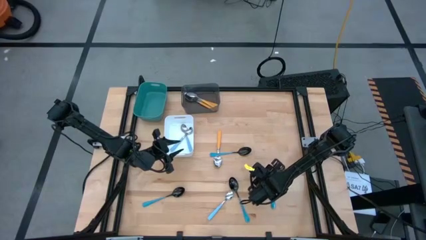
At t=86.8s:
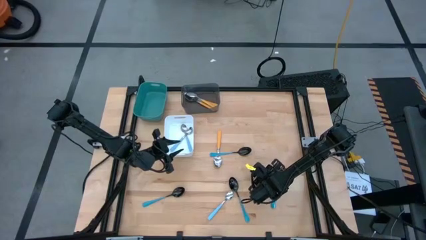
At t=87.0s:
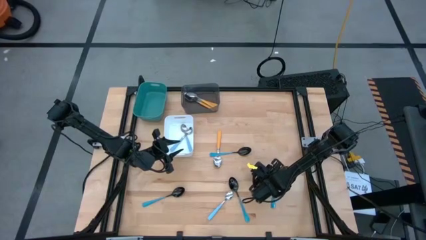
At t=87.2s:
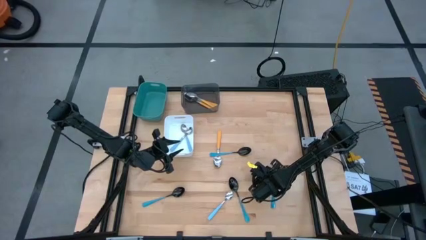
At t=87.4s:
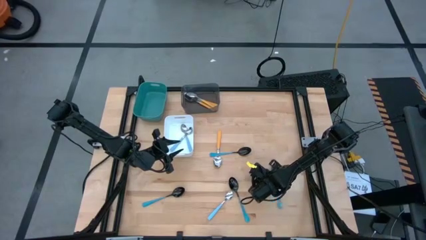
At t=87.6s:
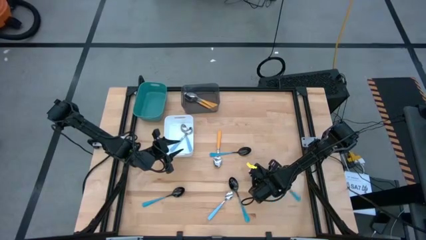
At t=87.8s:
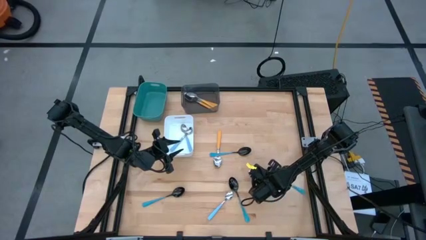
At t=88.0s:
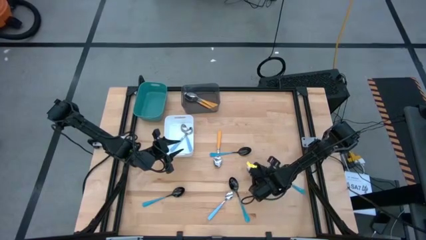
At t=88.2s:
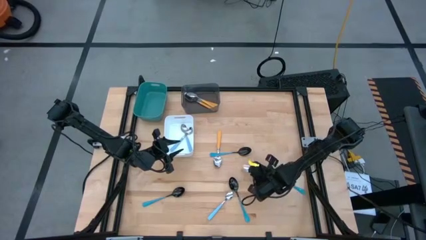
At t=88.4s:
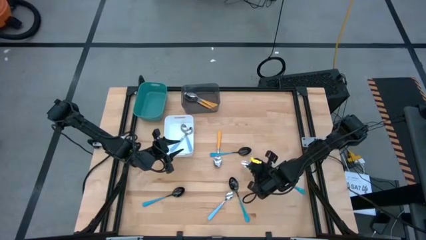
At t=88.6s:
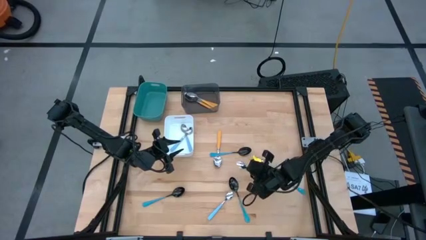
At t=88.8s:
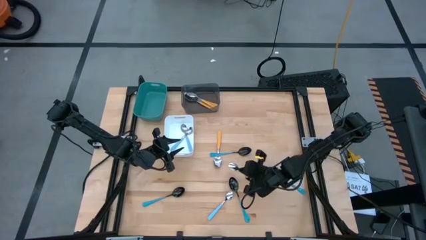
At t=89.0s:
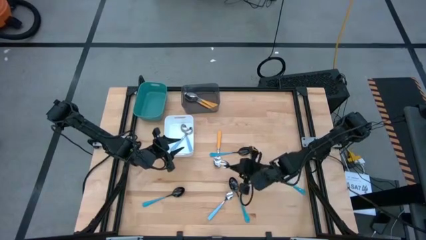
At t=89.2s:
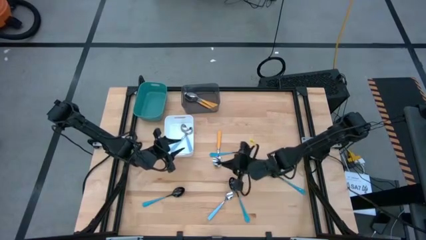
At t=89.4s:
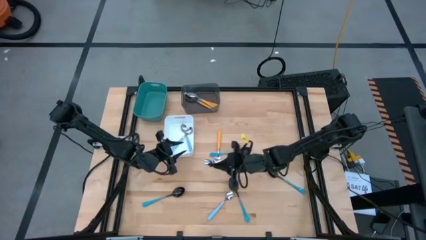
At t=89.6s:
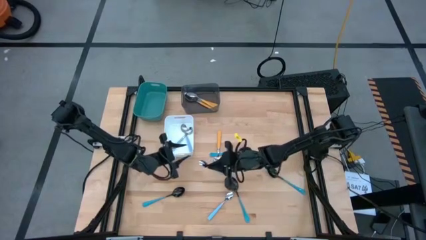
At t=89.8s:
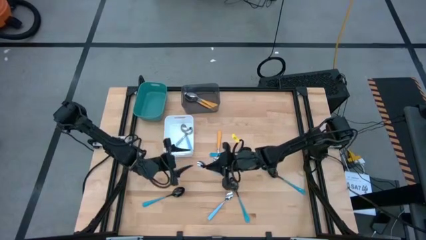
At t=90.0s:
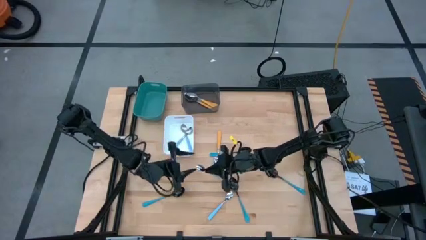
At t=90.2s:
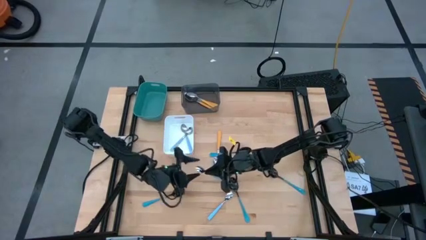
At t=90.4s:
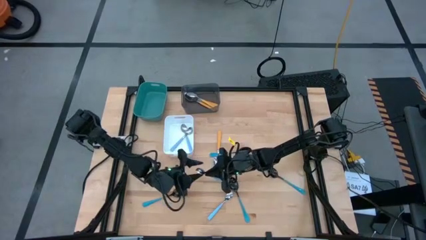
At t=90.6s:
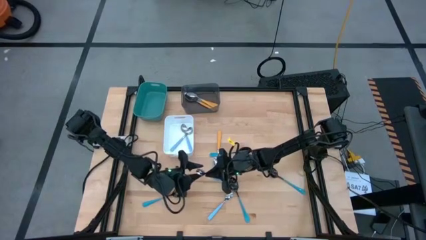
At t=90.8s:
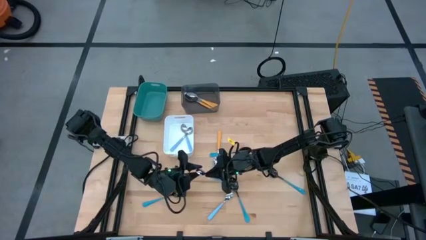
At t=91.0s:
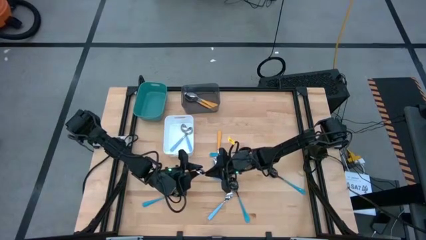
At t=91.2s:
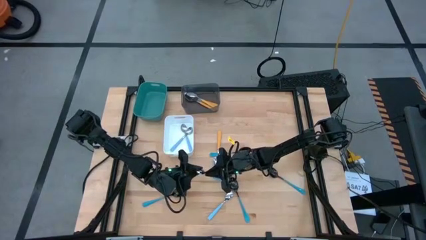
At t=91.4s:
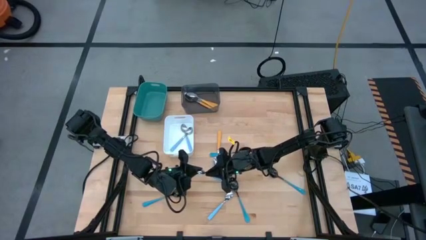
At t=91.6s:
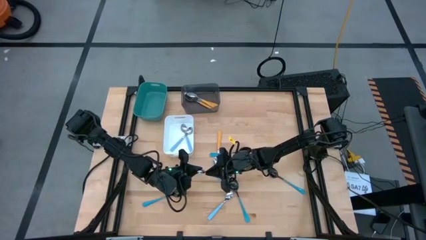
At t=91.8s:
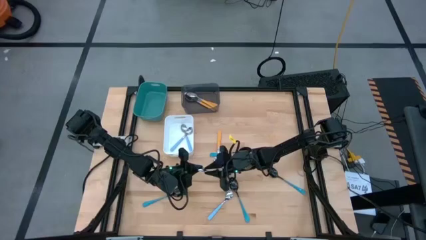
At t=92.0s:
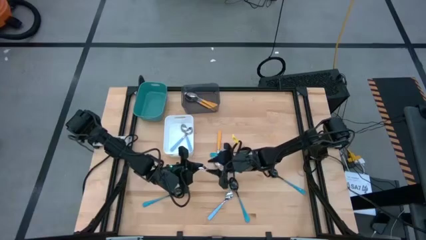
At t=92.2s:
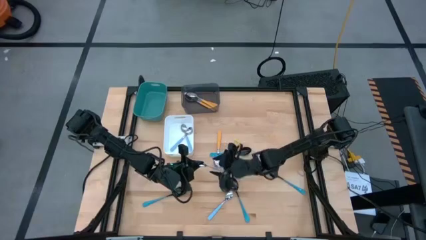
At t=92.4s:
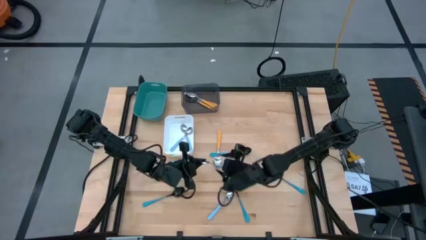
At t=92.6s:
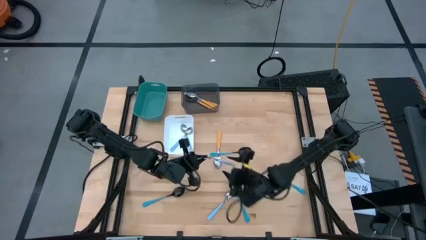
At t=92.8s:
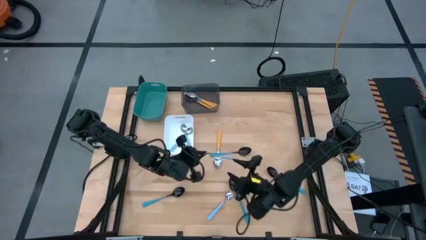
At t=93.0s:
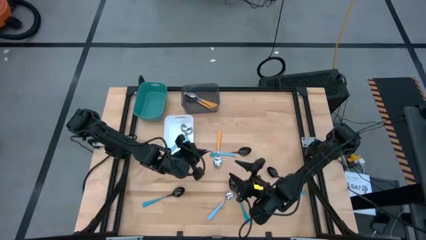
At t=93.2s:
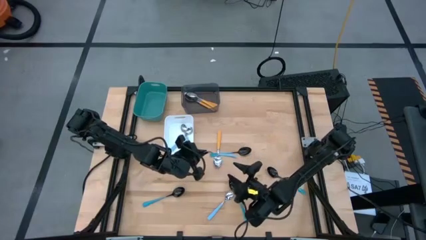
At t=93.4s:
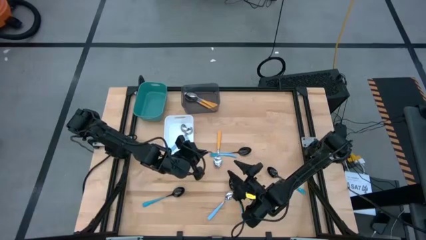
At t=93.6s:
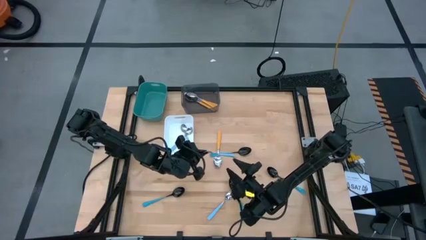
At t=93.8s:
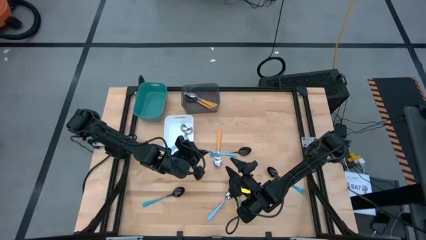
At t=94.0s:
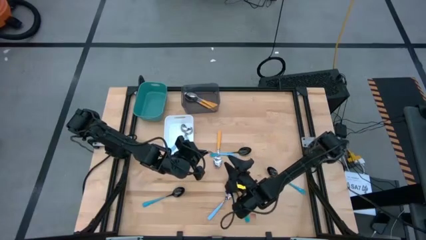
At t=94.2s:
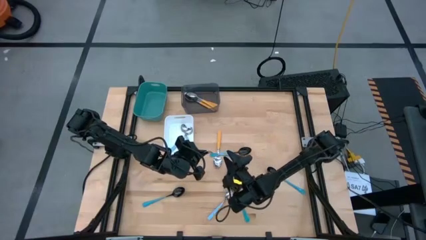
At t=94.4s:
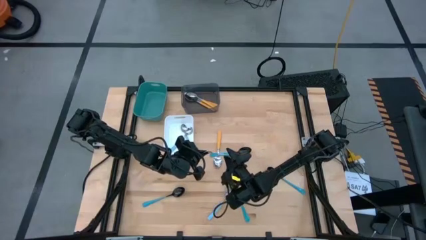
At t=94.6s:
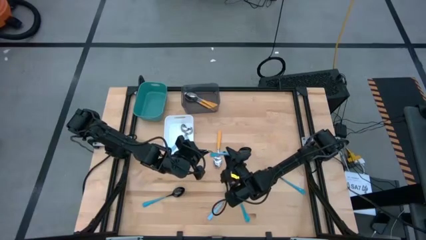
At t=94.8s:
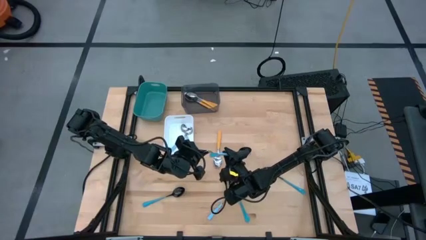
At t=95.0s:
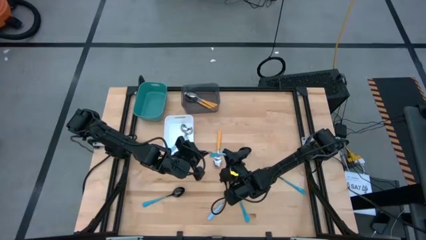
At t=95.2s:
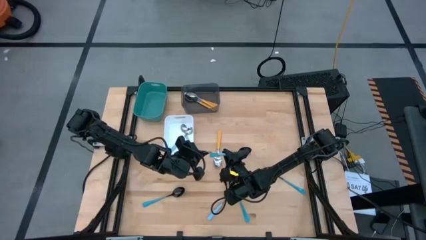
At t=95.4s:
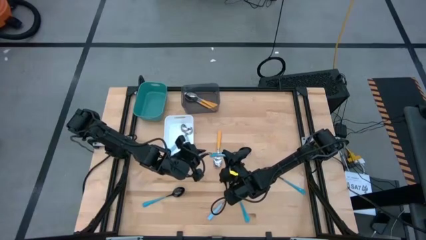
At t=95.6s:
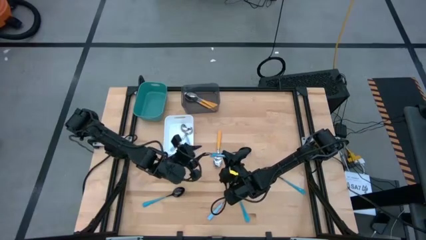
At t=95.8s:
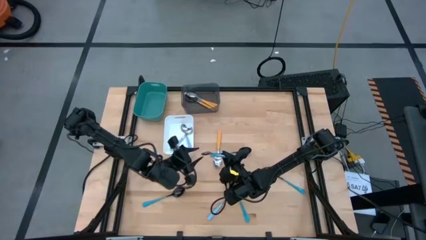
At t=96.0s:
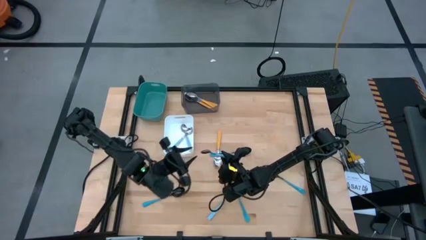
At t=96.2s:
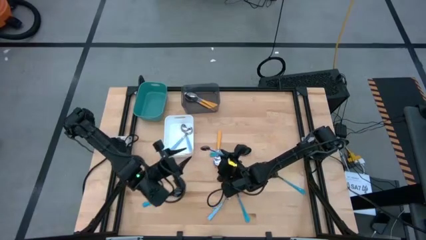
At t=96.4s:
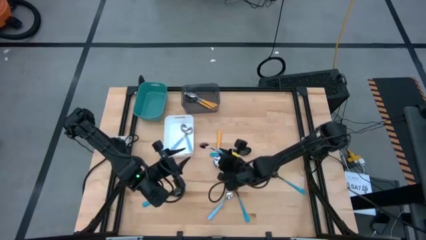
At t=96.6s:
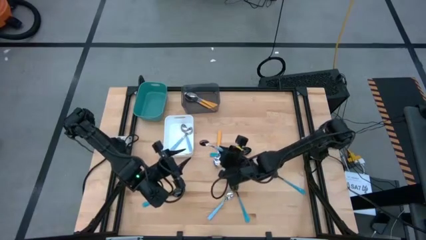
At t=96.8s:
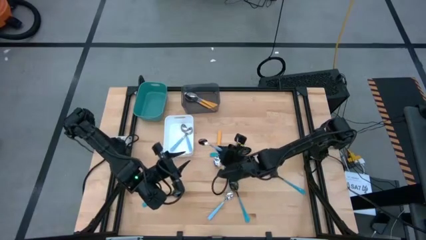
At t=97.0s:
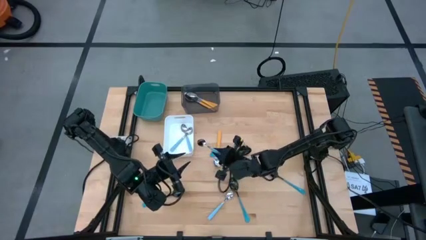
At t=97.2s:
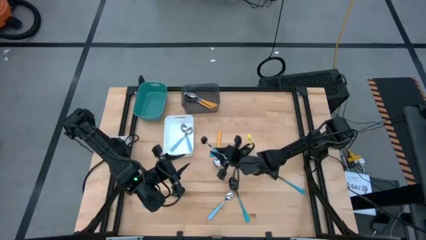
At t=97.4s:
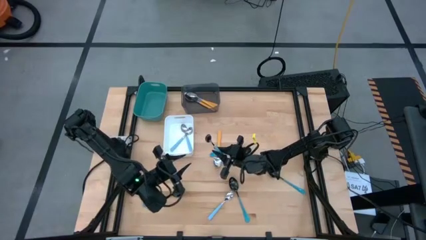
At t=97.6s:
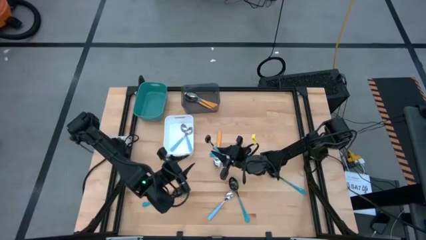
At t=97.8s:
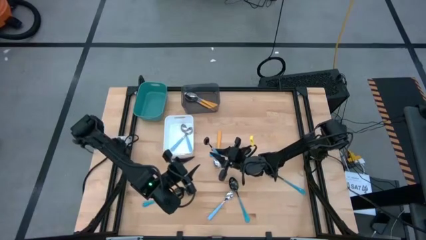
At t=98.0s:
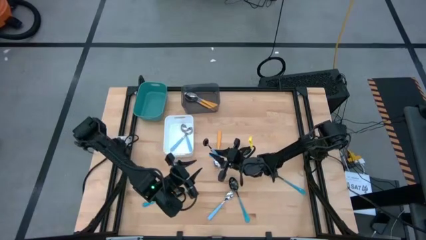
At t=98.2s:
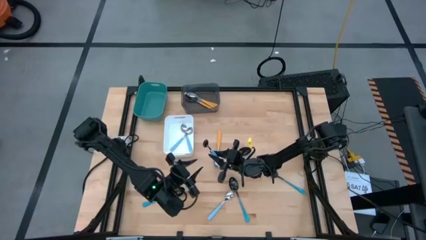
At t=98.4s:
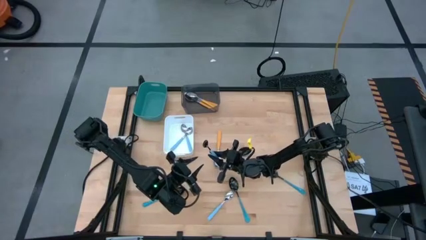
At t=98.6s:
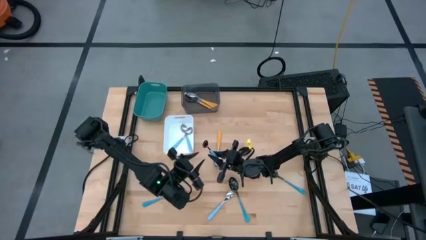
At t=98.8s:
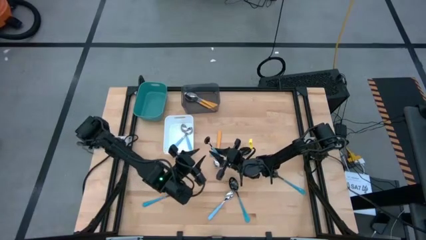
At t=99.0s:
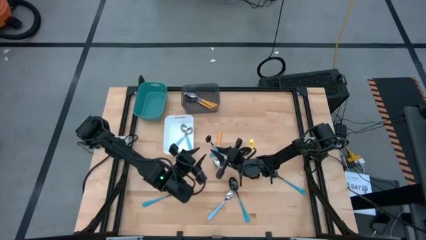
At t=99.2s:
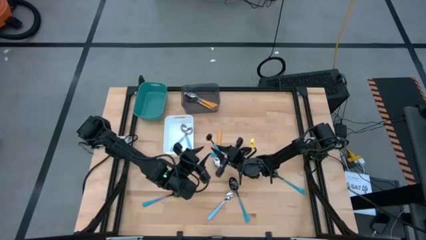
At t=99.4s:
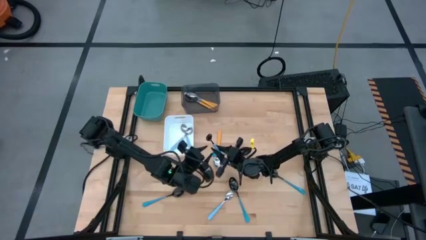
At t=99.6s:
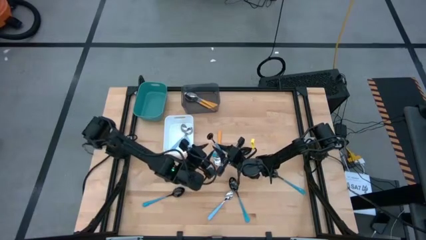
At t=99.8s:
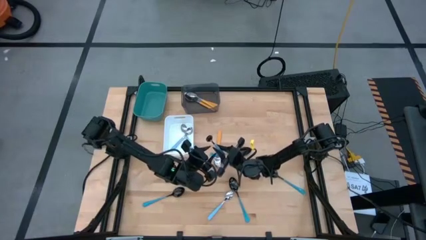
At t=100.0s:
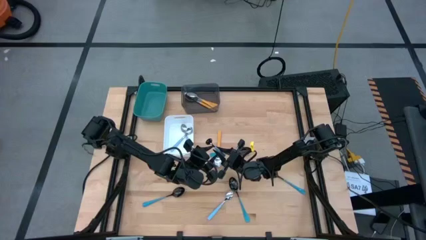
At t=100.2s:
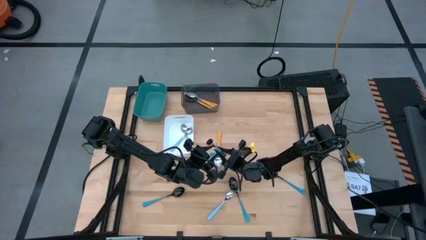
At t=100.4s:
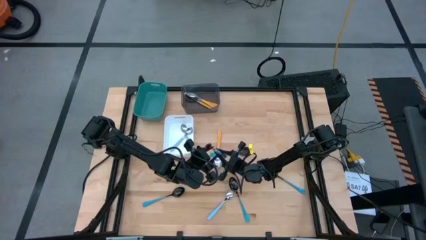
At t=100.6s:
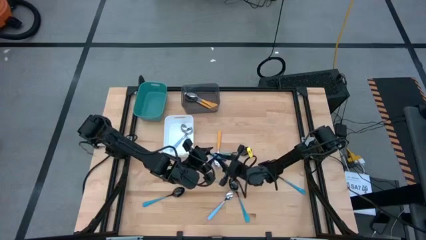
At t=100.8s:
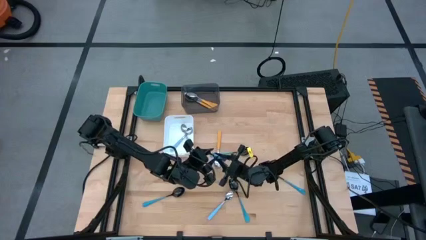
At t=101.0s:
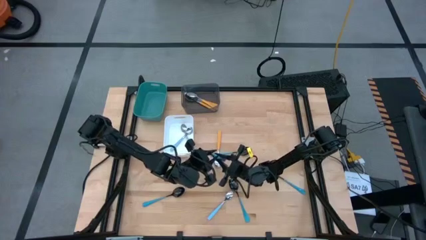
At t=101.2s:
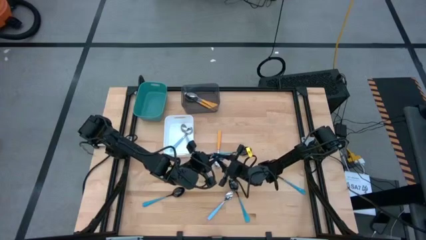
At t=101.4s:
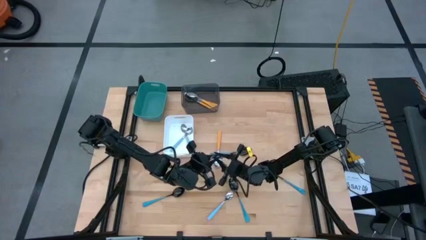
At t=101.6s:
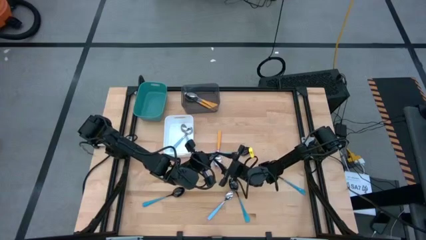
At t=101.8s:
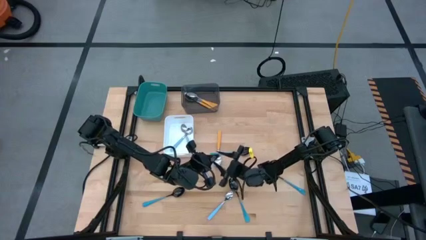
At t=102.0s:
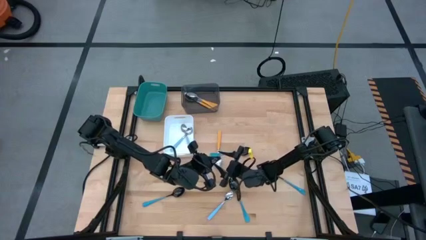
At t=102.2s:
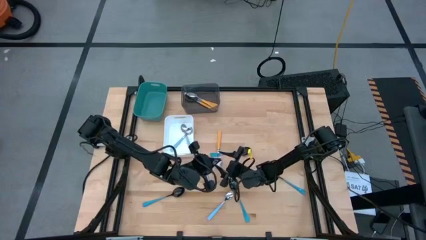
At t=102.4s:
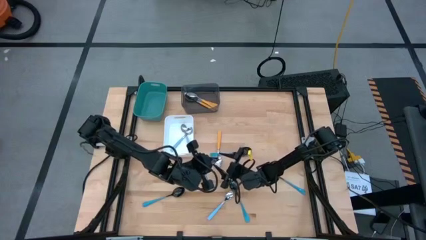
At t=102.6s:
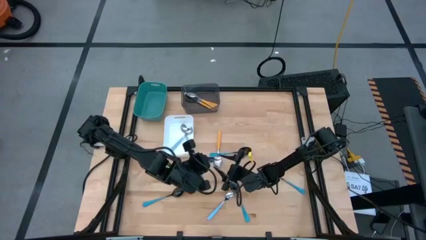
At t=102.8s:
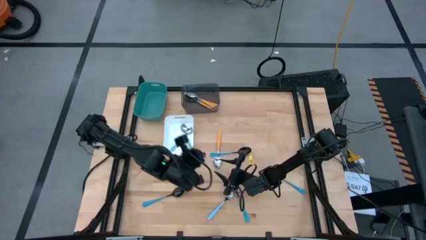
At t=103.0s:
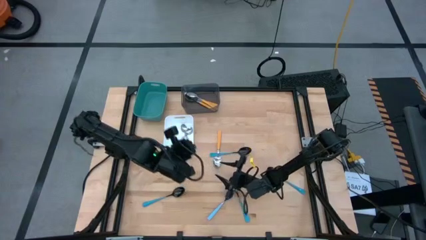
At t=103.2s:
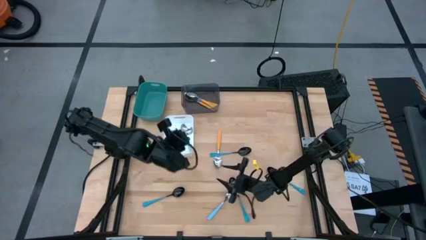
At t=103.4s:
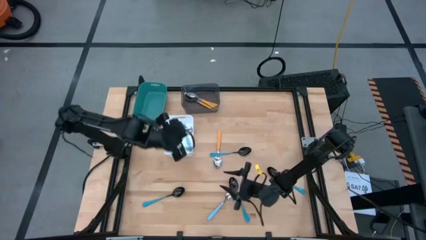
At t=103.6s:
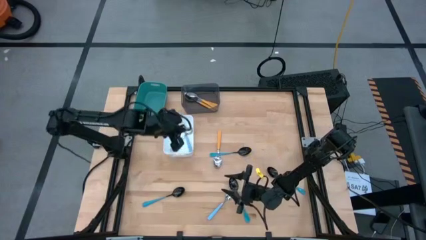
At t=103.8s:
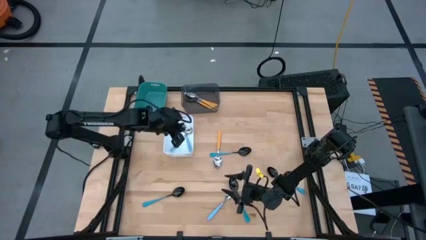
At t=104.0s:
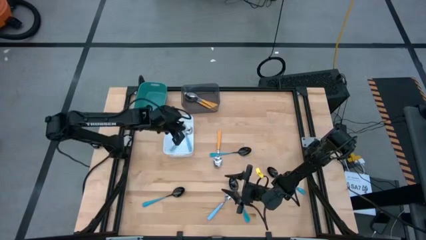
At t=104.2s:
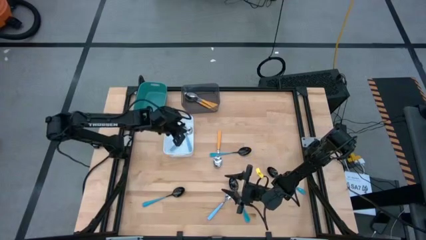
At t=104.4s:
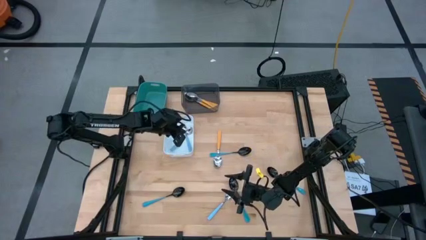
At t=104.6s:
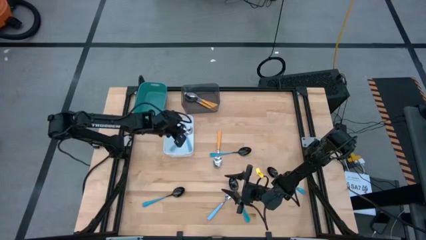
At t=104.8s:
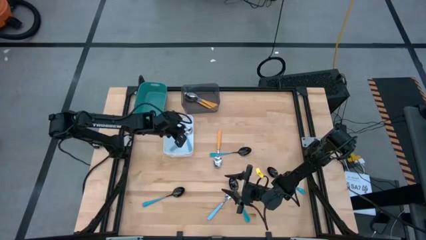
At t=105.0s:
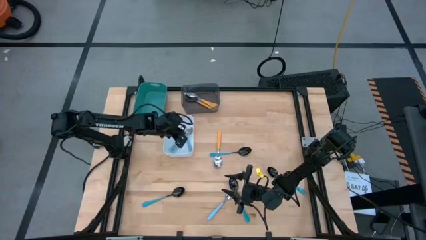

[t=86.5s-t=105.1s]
Task: Sort silverware by color (type)
Put the light blue spoon into the white bin
